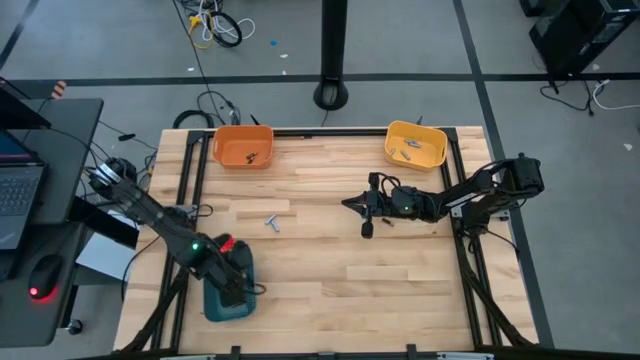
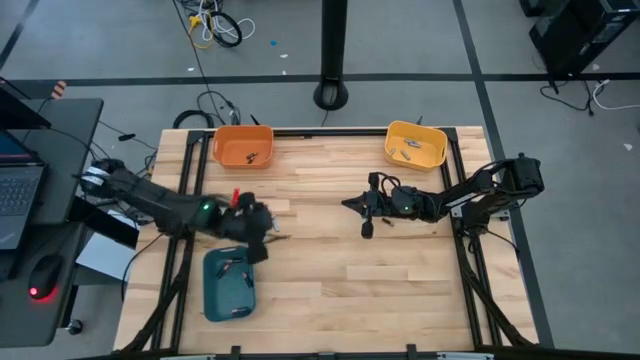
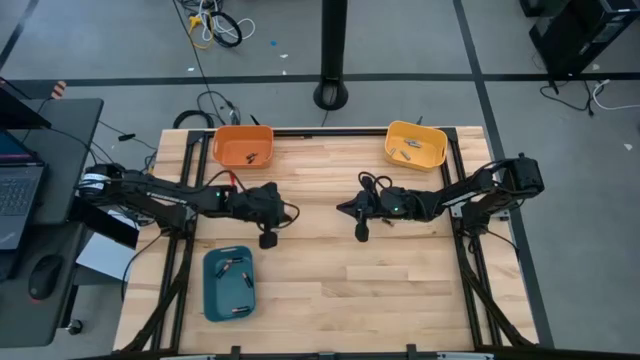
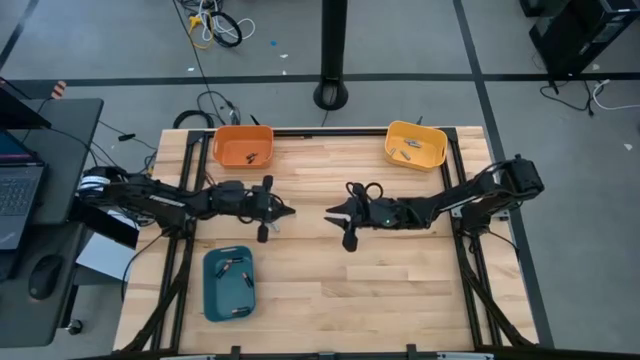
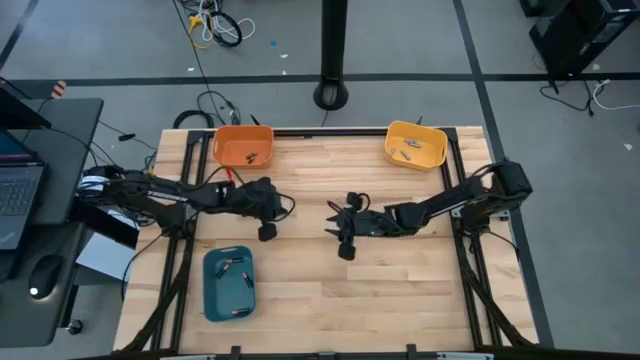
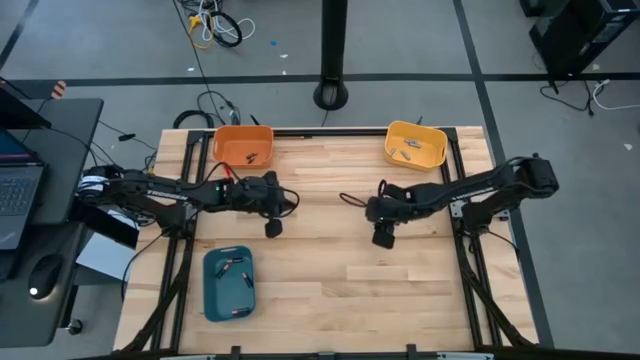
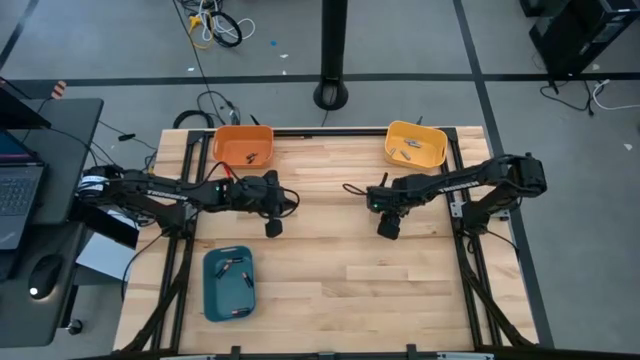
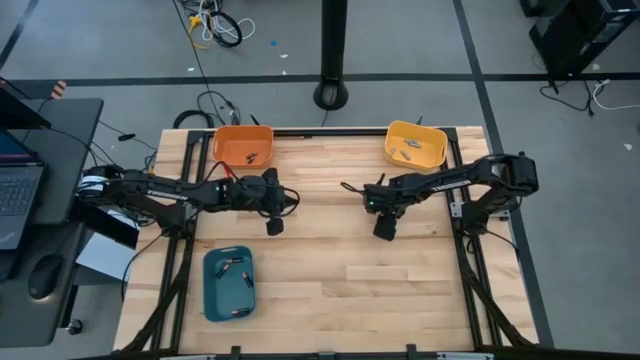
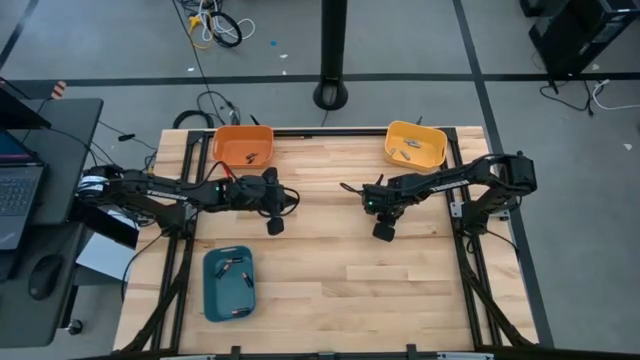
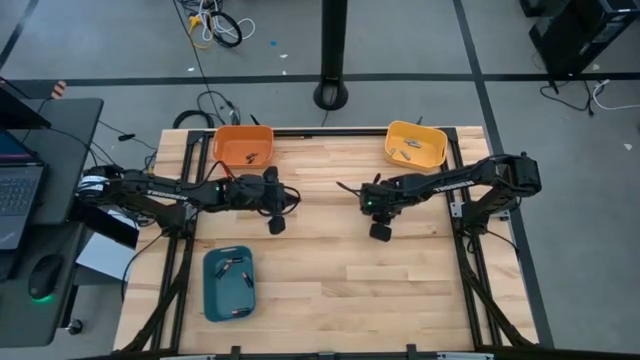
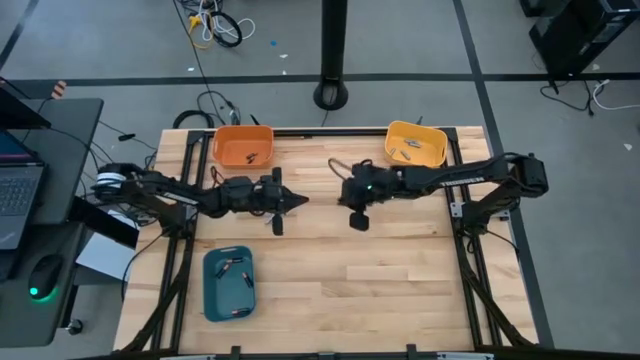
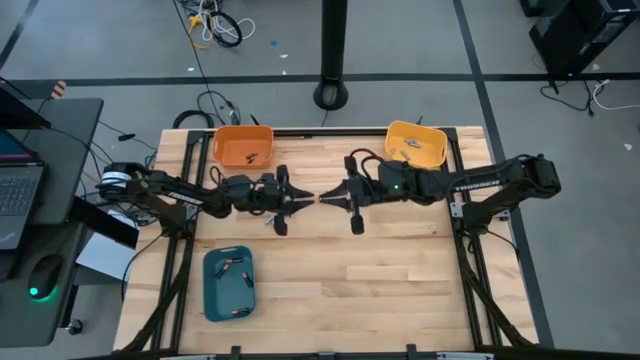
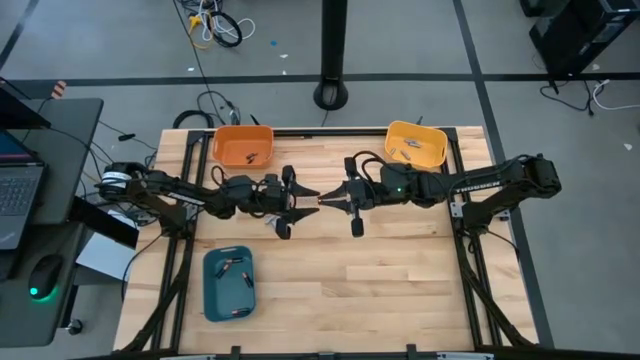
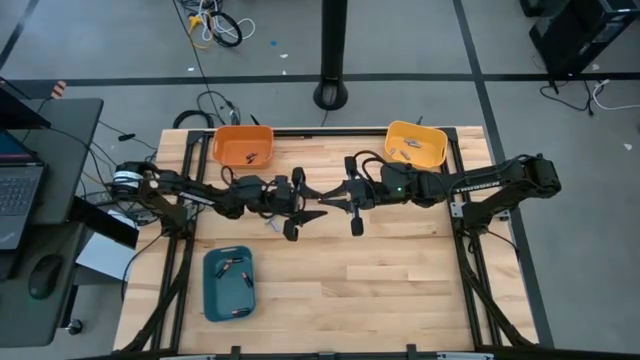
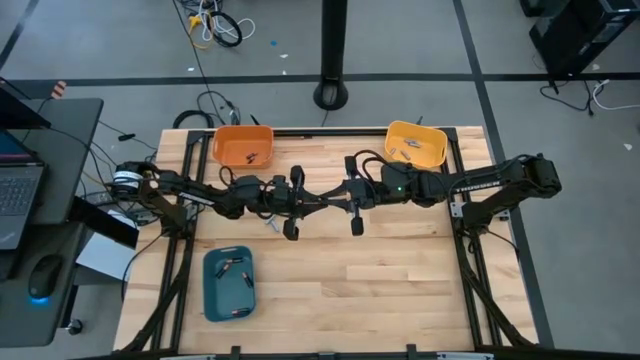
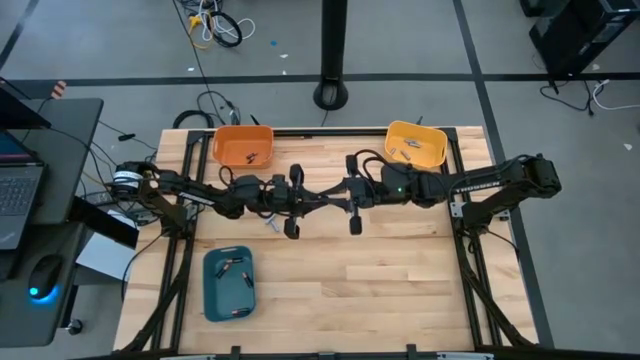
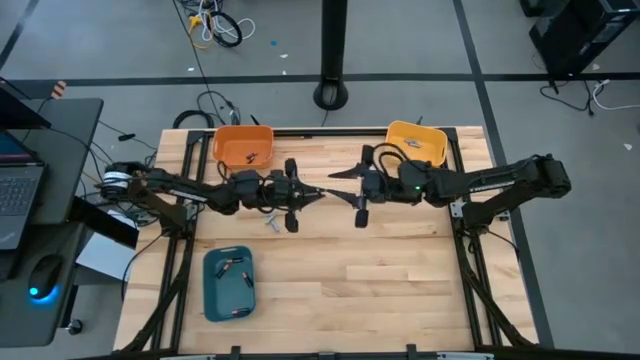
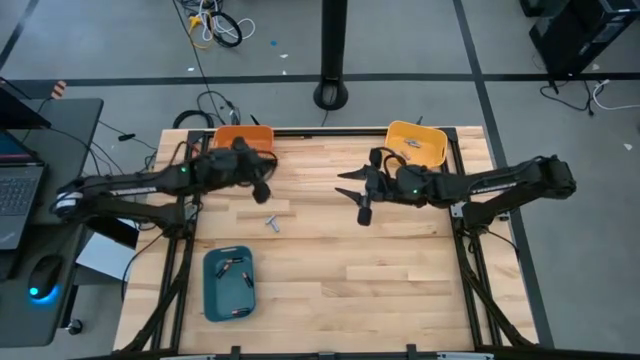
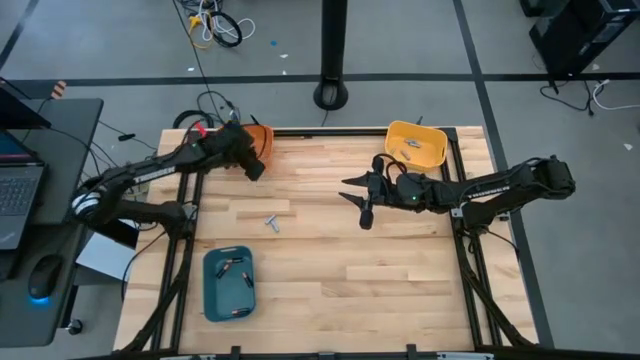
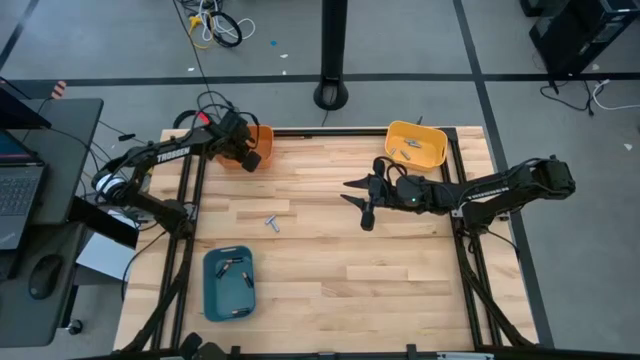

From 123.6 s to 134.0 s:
Task: Sort batteries
Put the small copper and black battery into the orange bin

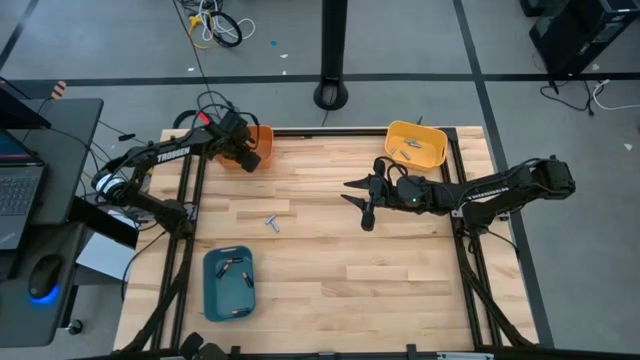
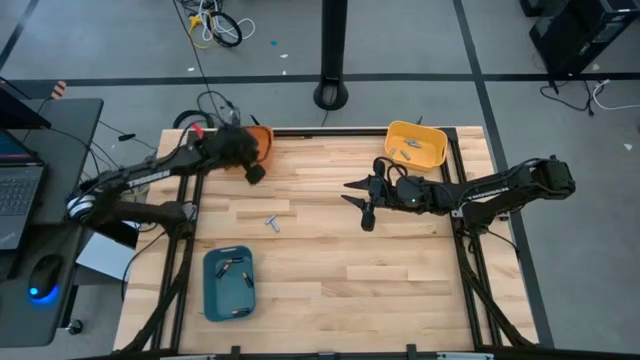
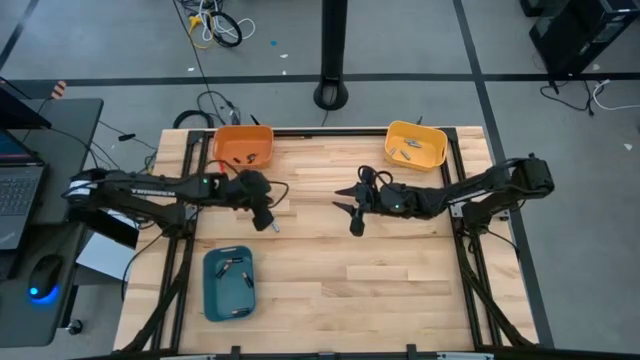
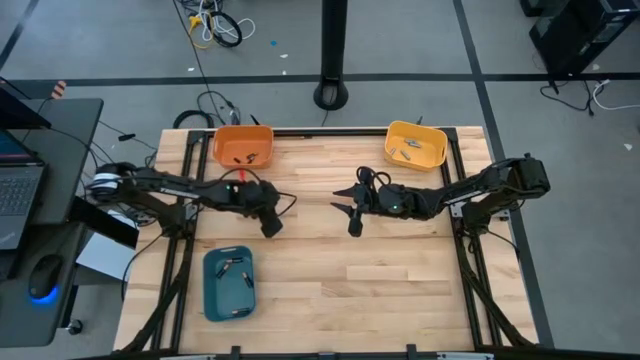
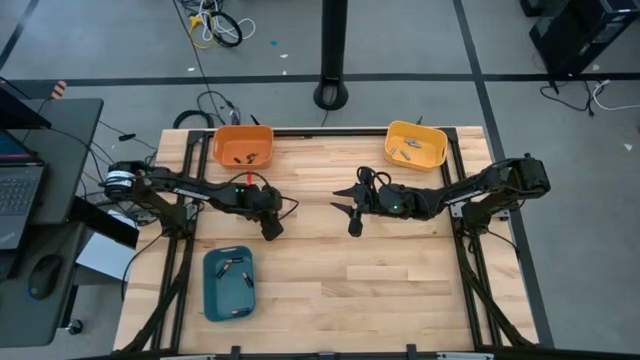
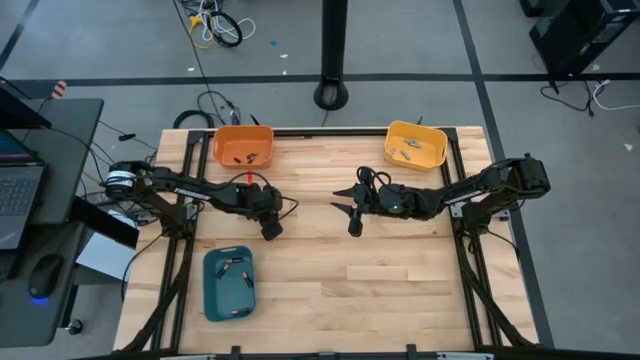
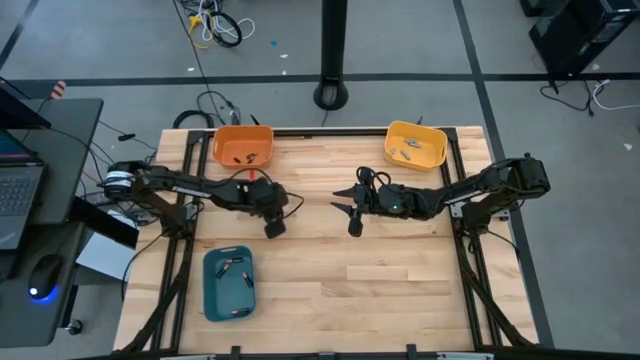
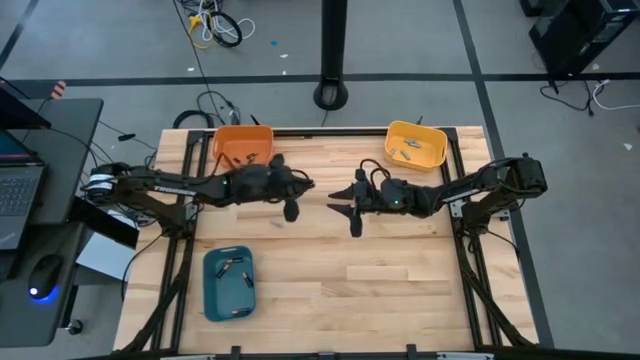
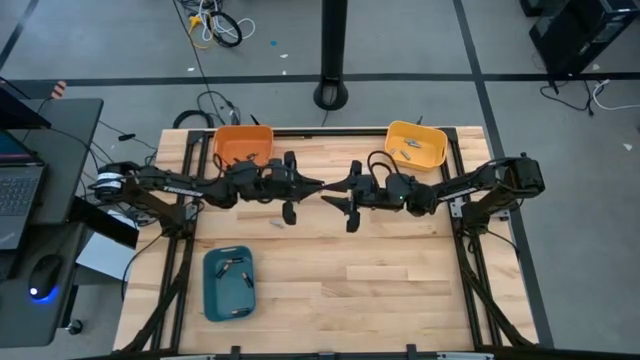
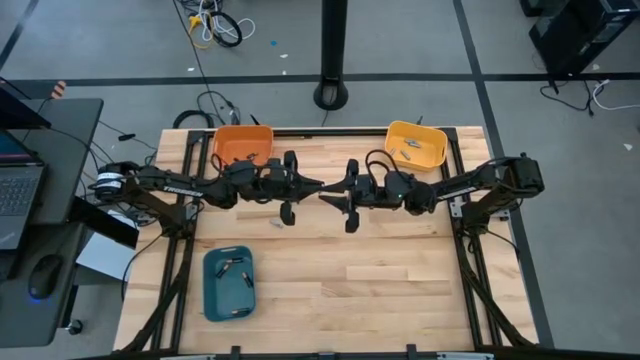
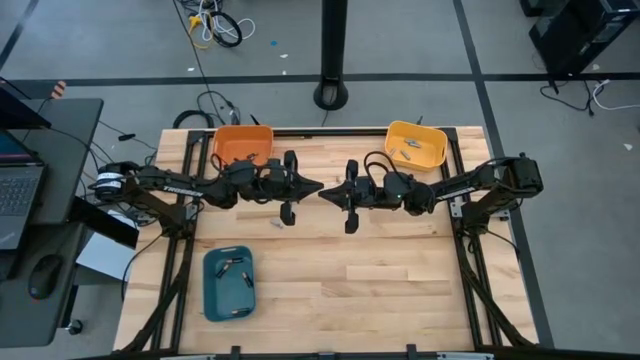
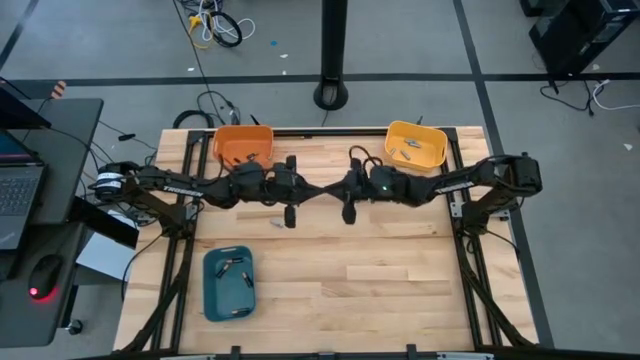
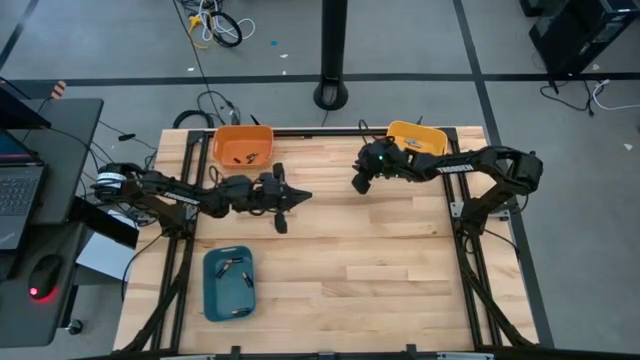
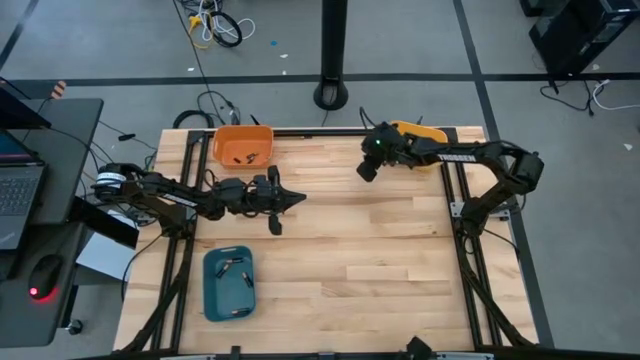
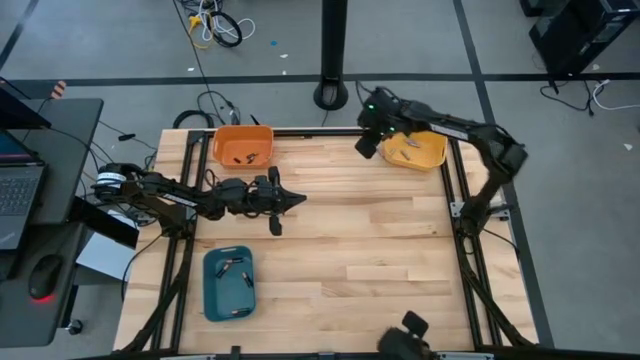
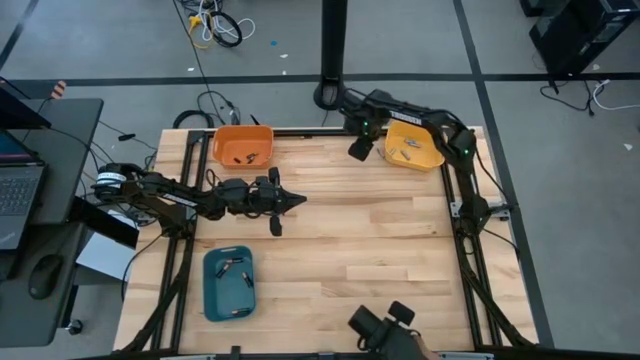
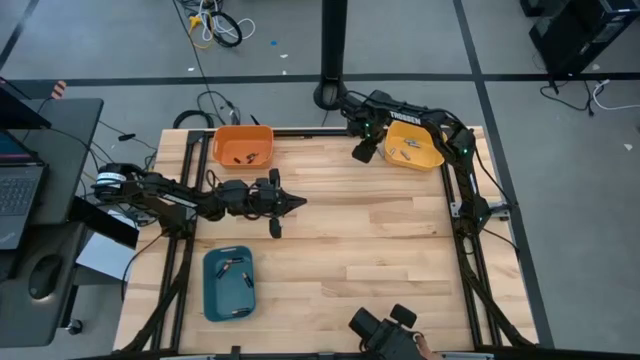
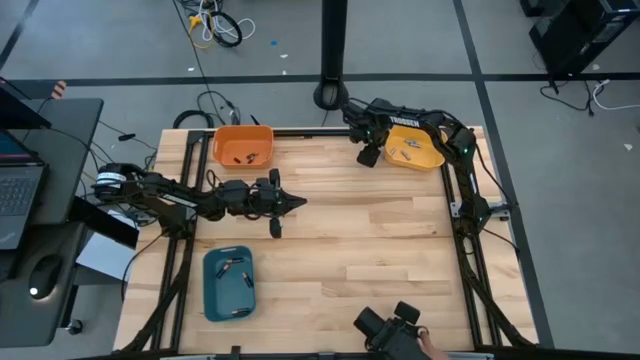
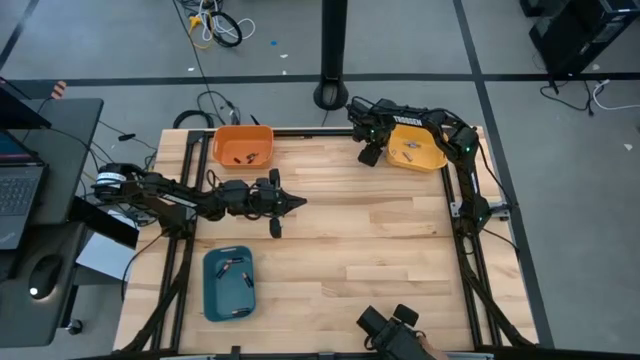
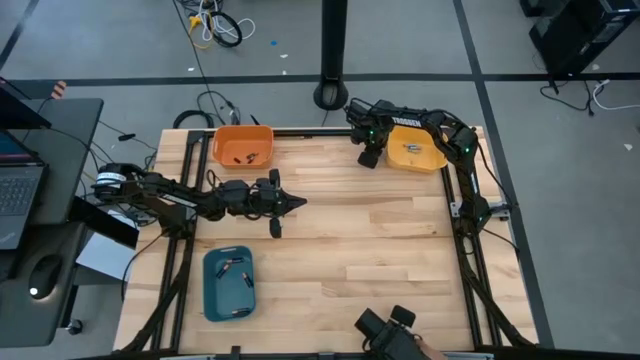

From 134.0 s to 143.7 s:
Put the small gray battery into the yellow bin

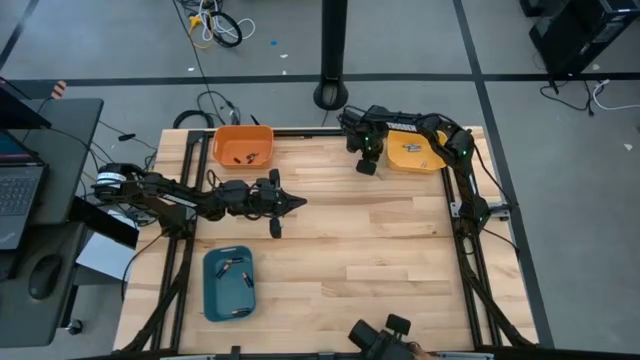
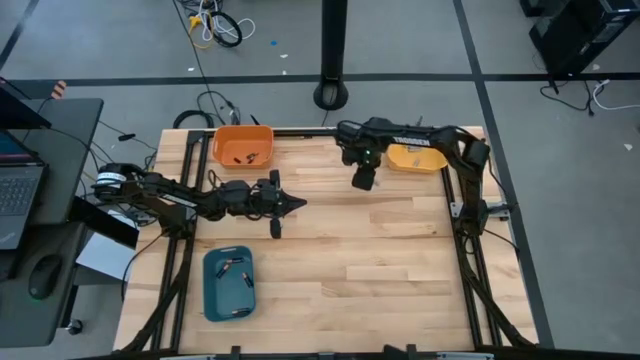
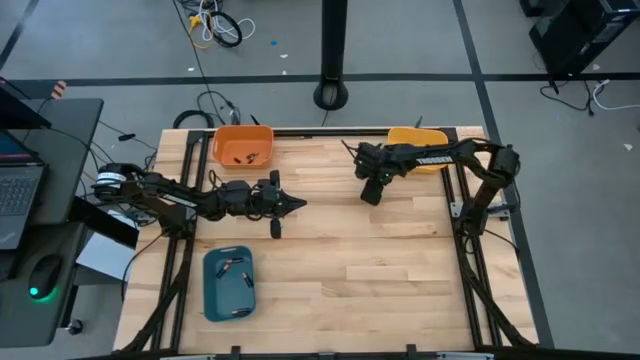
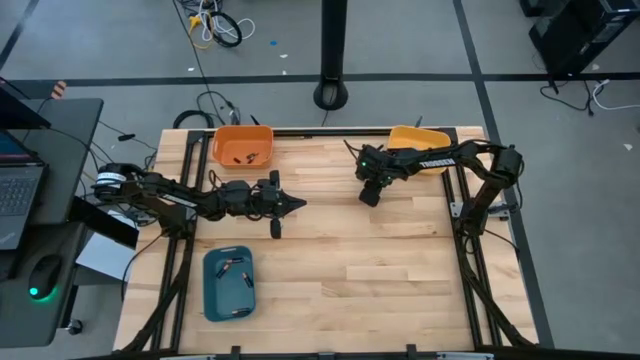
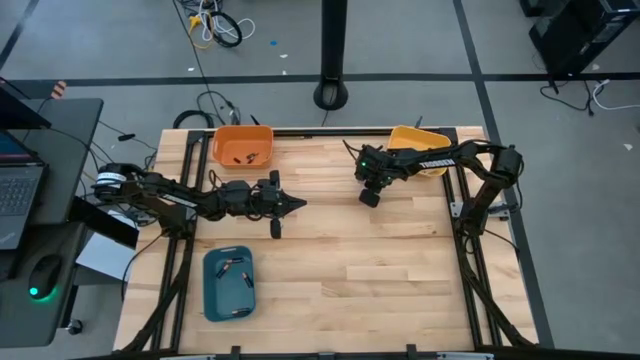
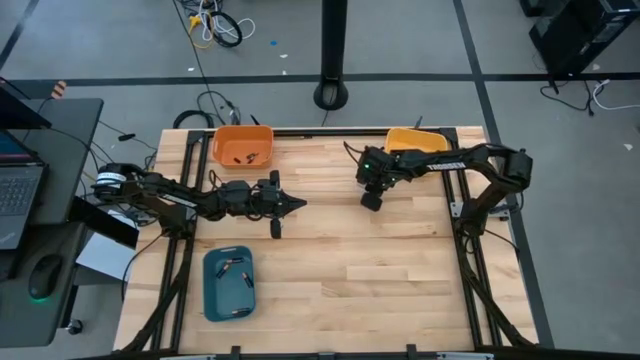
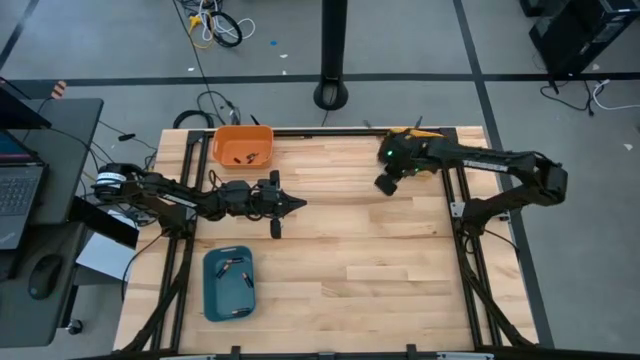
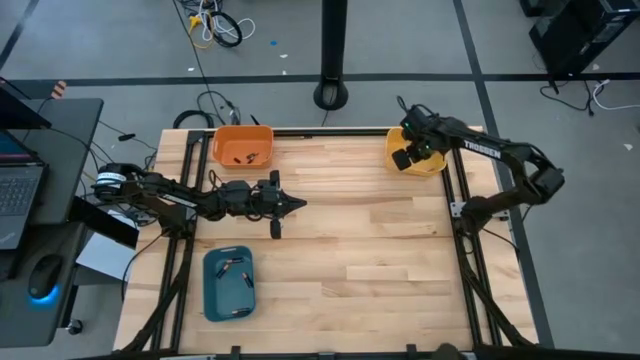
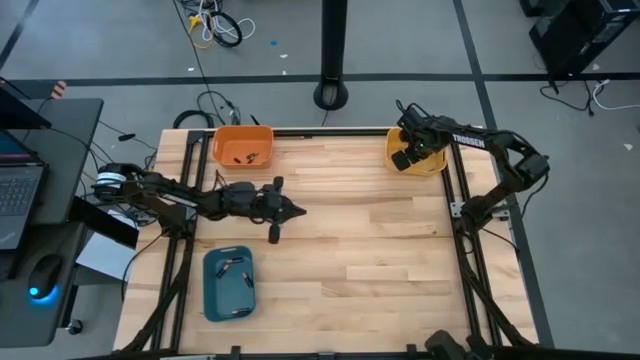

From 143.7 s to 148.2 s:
Put the small gray battery into the yellow bin
